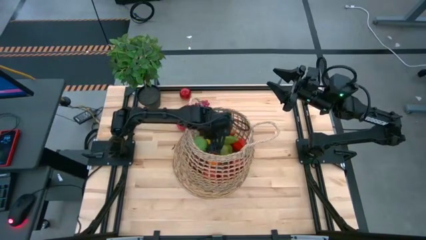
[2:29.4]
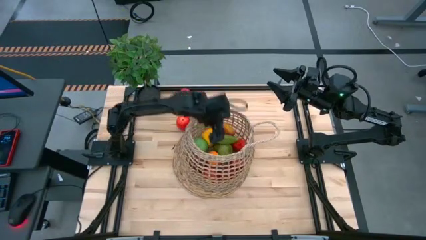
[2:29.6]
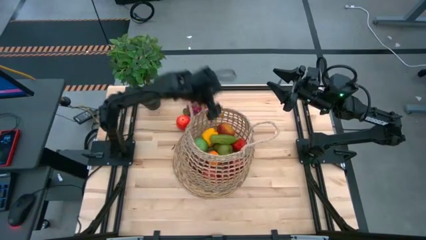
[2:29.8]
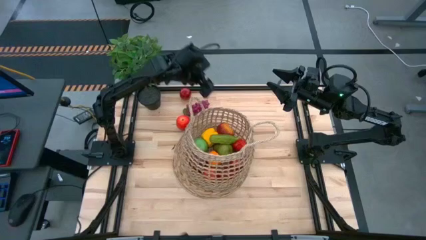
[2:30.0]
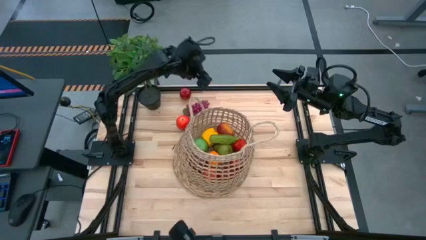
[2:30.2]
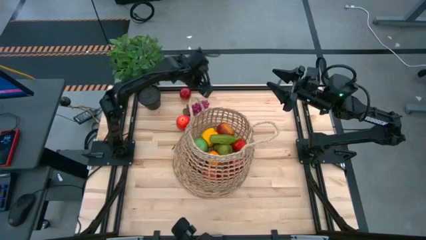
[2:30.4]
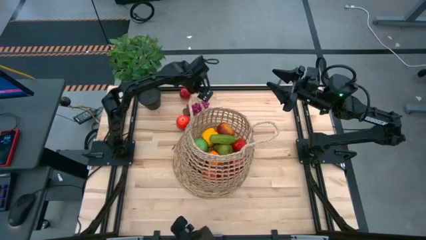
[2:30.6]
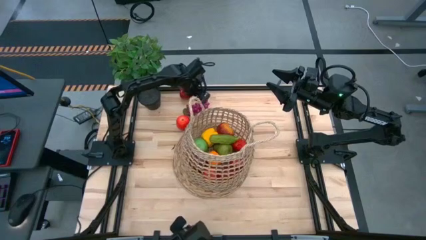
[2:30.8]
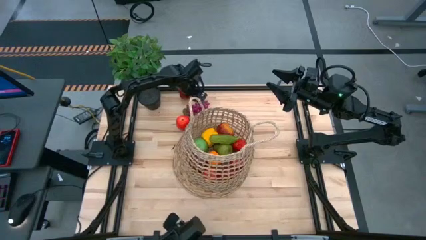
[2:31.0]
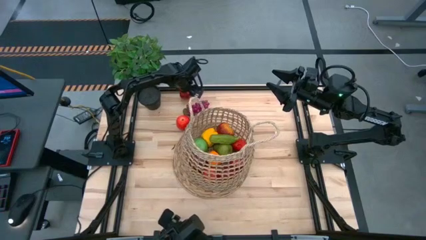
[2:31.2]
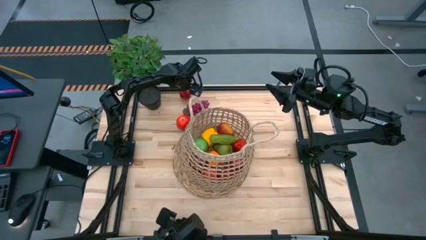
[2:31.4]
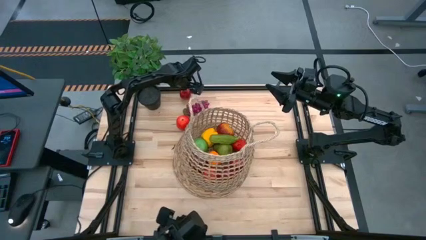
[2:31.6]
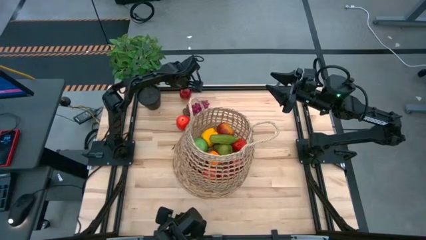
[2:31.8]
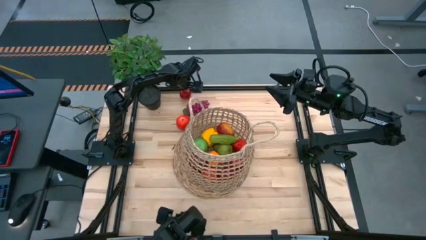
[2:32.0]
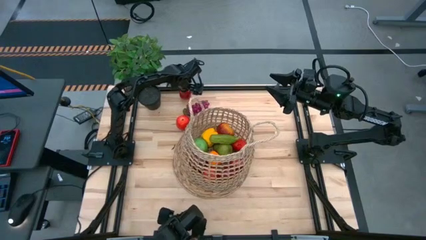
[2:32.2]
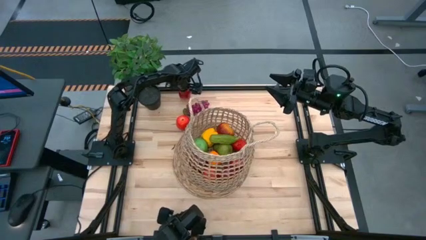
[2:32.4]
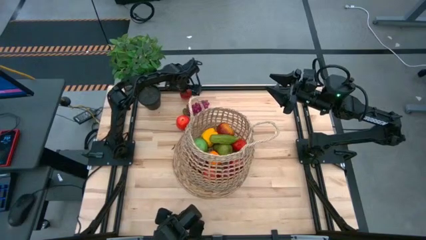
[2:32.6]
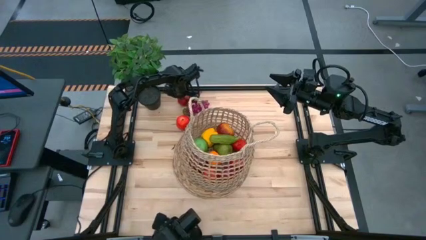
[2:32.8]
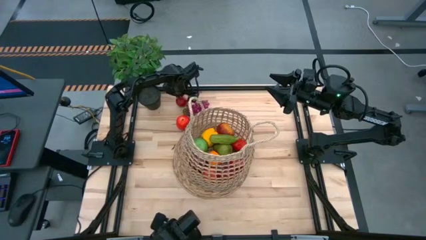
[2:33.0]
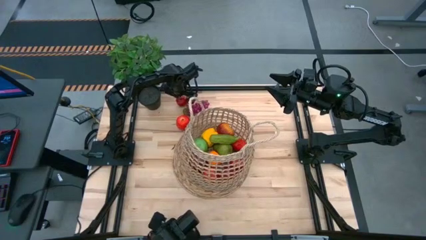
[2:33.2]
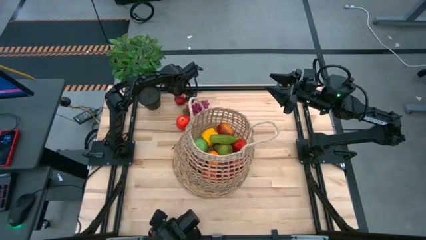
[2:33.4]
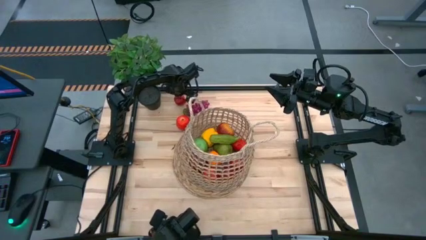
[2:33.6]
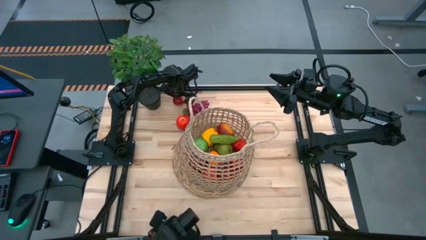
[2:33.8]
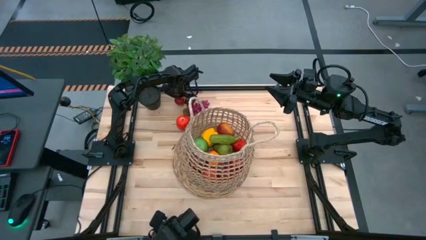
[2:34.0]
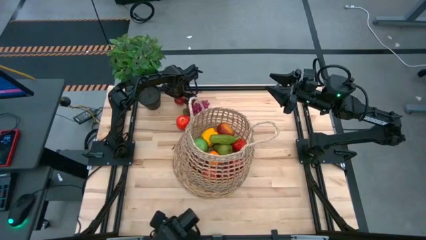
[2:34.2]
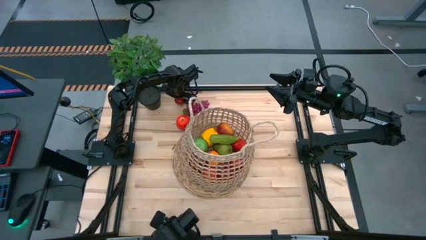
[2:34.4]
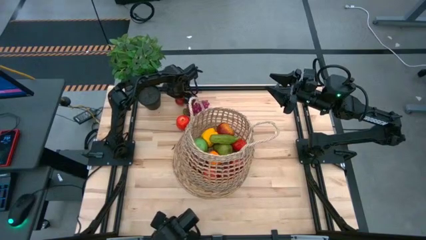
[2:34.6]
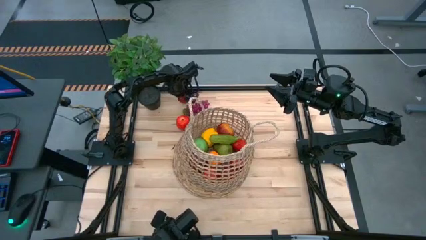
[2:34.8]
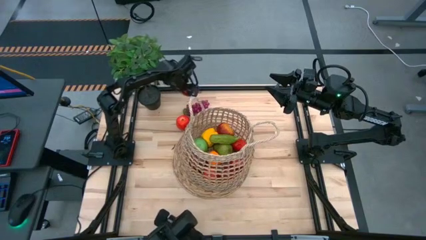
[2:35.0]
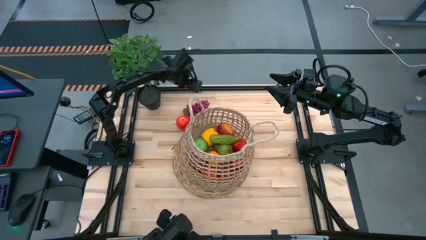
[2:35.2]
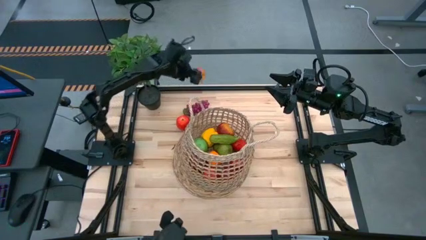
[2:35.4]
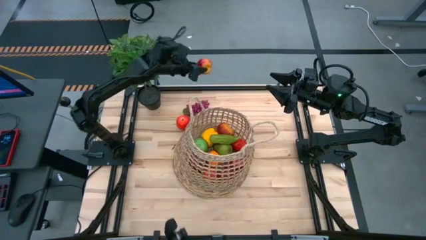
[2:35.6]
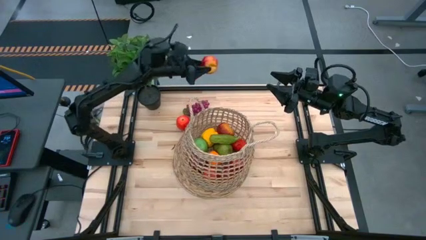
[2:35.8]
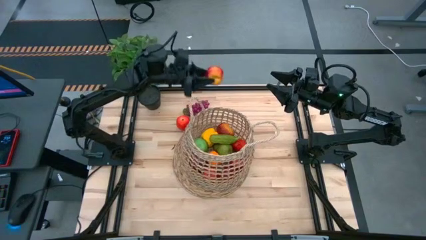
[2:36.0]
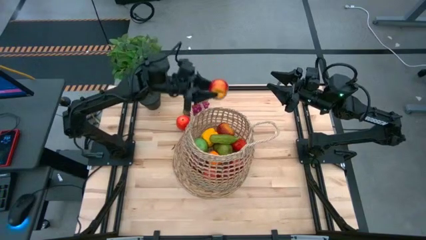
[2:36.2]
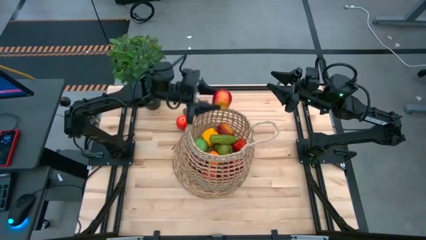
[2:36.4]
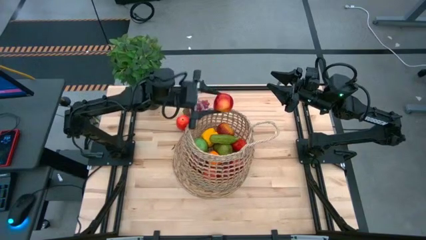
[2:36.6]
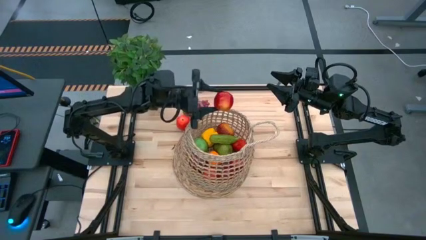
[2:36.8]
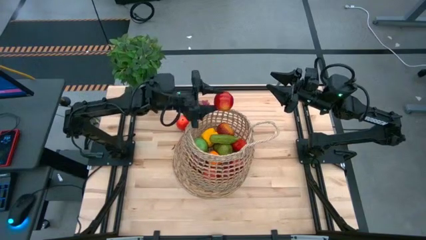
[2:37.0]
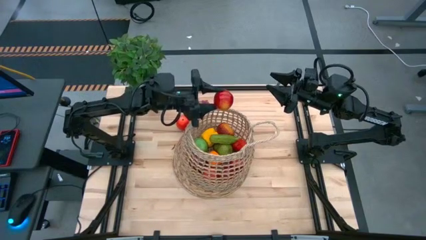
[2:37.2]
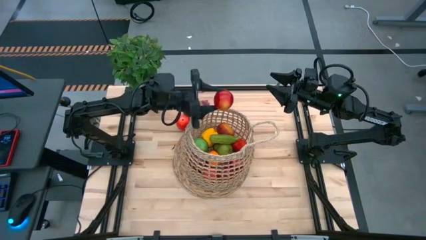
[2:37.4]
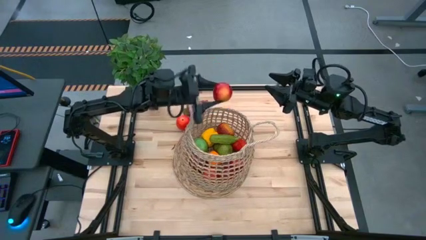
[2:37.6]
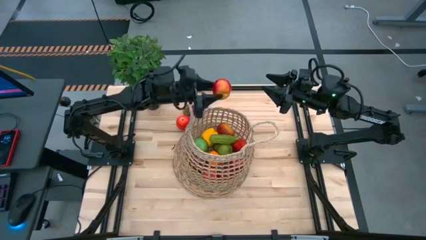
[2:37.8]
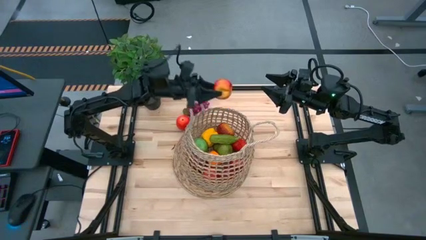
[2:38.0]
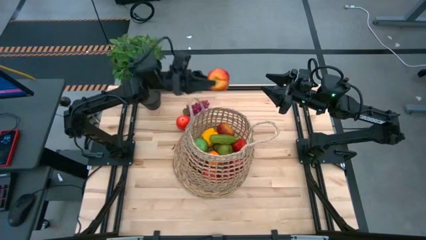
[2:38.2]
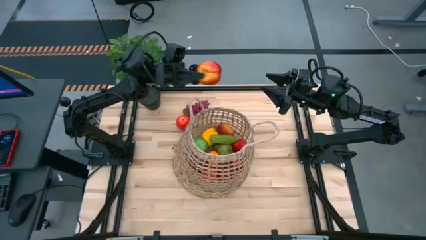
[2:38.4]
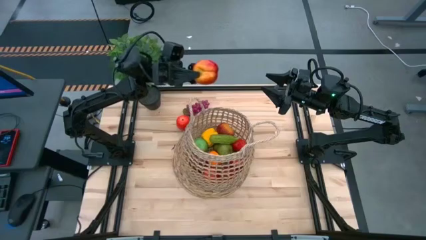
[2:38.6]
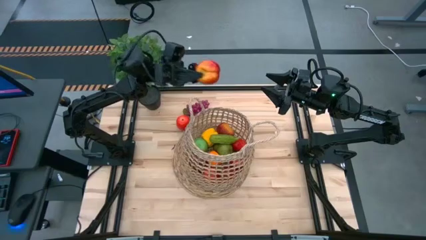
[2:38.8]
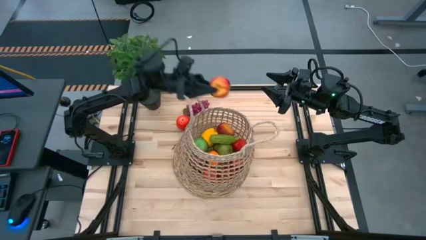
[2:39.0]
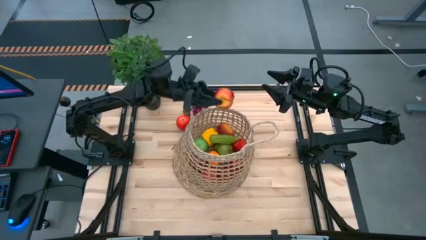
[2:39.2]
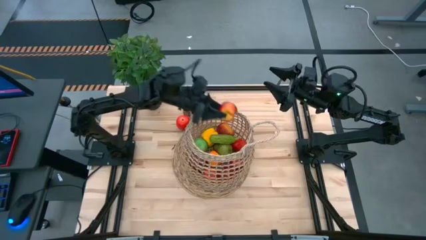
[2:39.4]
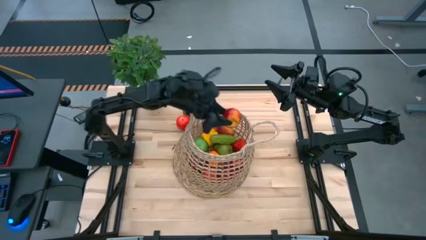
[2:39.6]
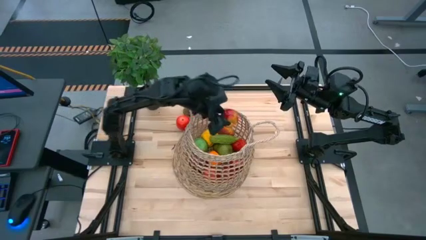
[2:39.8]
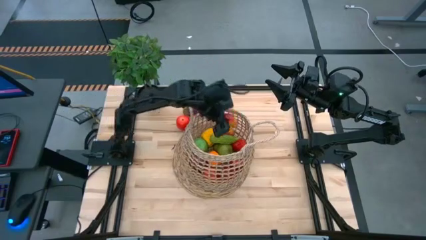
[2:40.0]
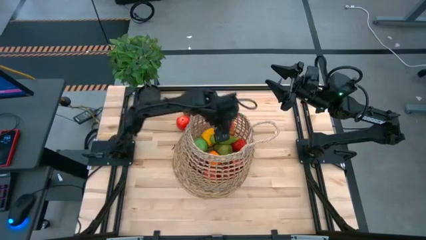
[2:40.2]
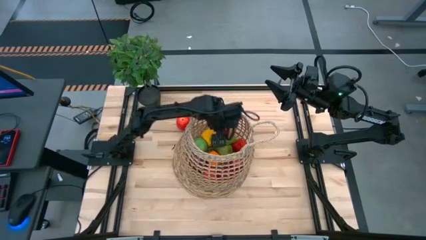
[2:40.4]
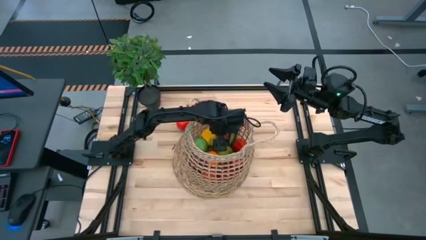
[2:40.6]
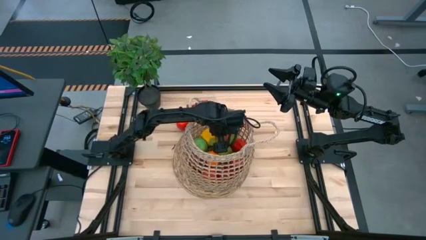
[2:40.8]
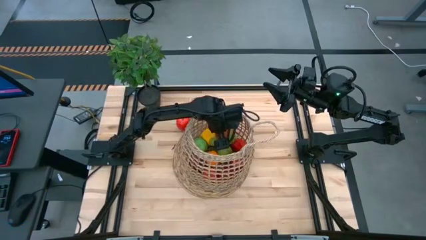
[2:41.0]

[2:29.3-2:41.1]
Task: Build produce basket
Put the red apple into the brown basket

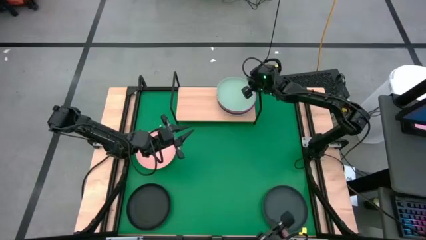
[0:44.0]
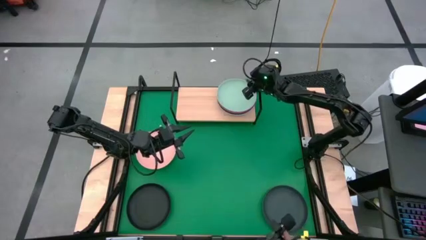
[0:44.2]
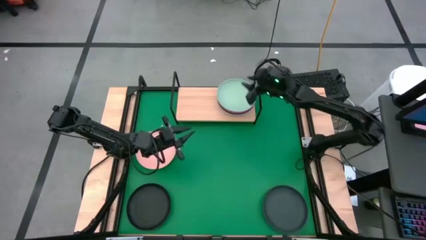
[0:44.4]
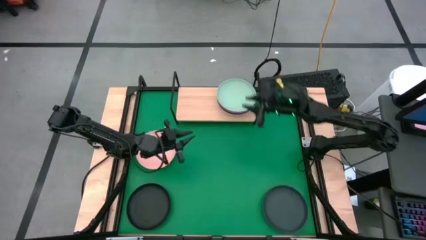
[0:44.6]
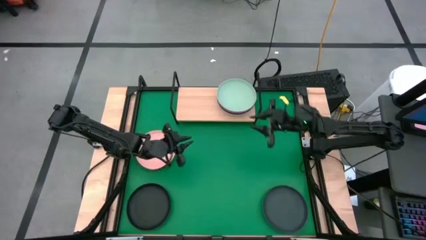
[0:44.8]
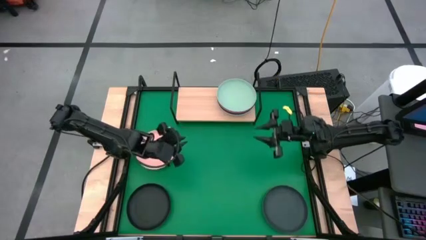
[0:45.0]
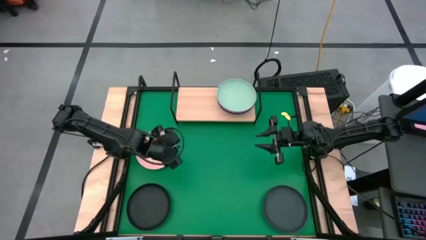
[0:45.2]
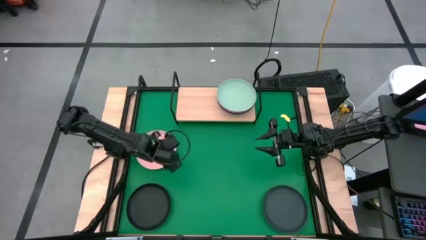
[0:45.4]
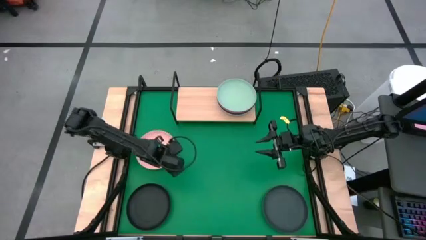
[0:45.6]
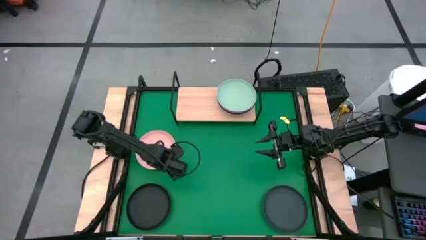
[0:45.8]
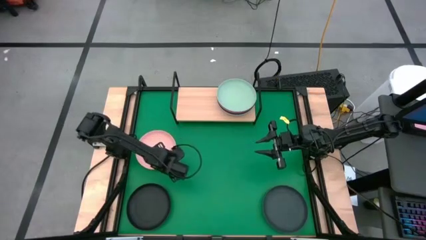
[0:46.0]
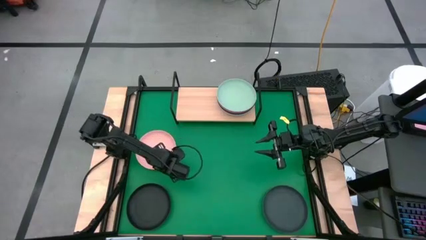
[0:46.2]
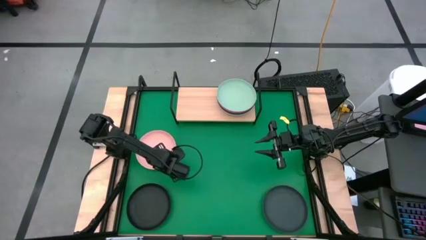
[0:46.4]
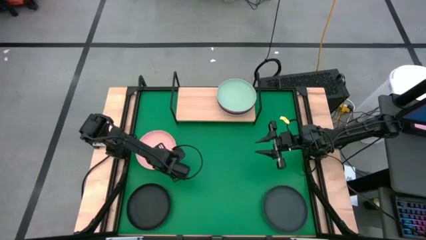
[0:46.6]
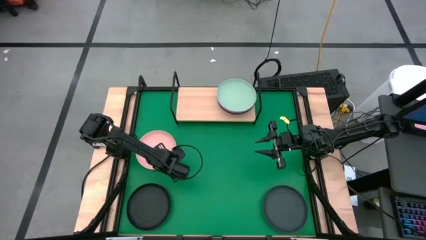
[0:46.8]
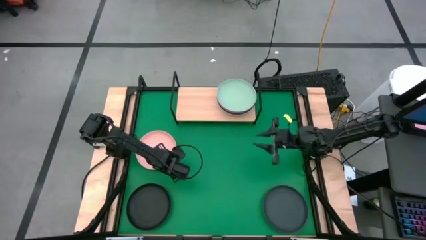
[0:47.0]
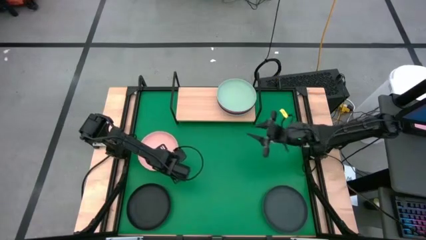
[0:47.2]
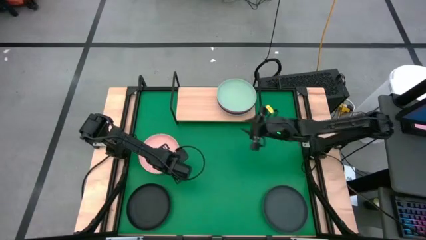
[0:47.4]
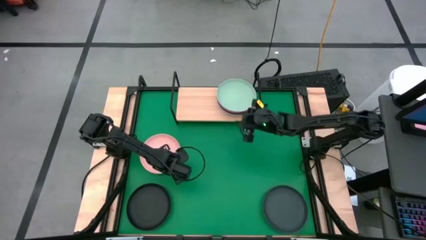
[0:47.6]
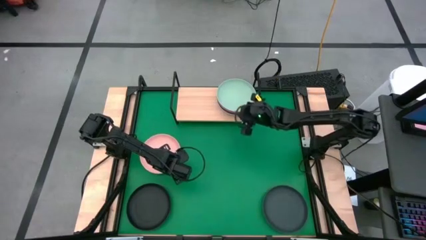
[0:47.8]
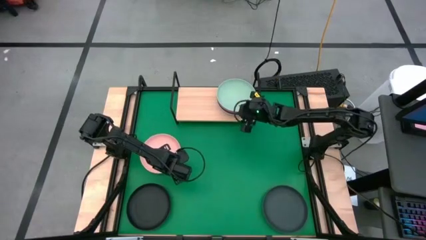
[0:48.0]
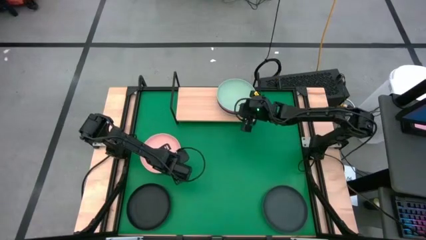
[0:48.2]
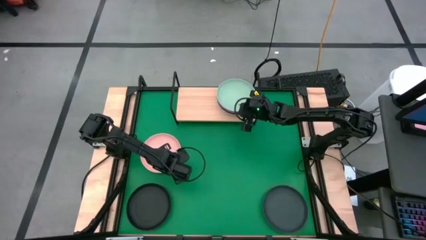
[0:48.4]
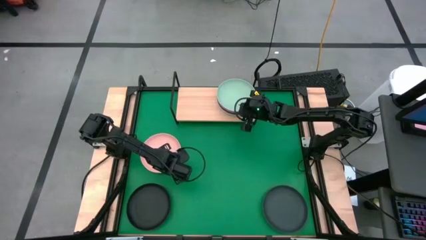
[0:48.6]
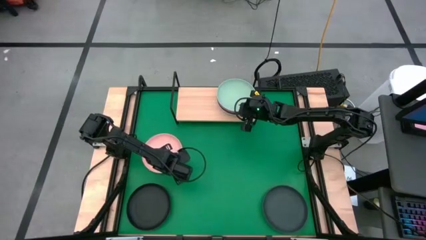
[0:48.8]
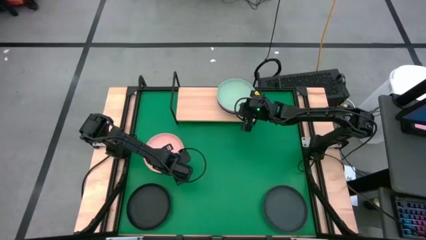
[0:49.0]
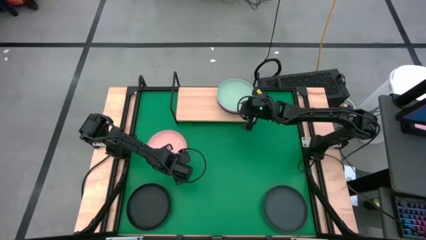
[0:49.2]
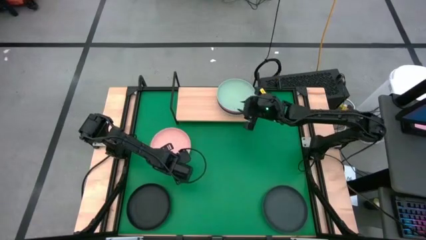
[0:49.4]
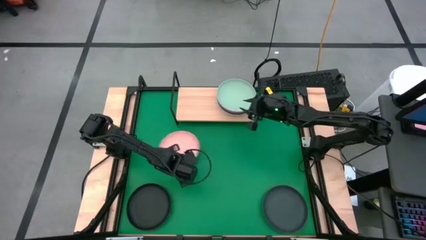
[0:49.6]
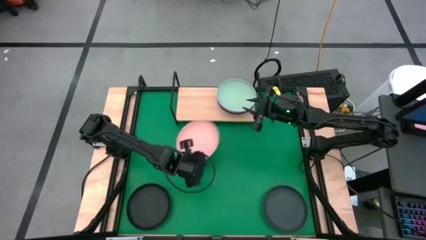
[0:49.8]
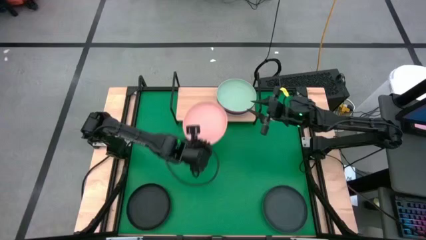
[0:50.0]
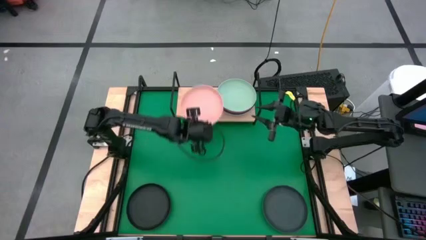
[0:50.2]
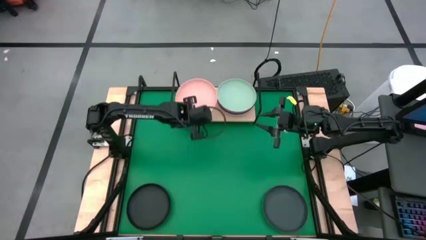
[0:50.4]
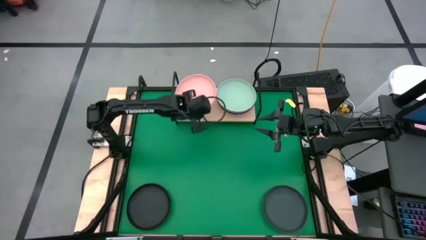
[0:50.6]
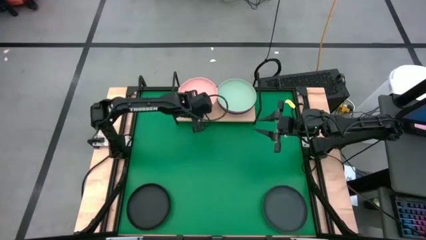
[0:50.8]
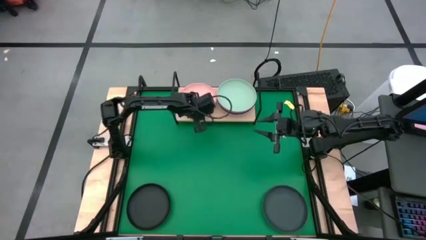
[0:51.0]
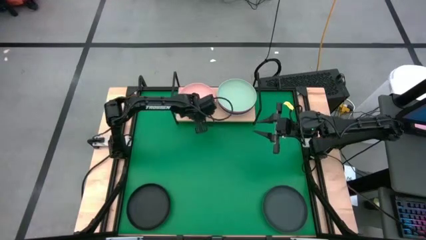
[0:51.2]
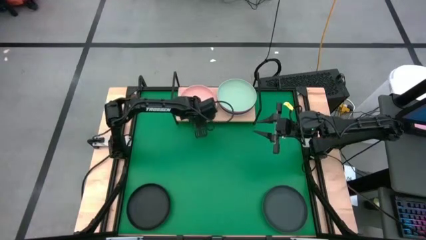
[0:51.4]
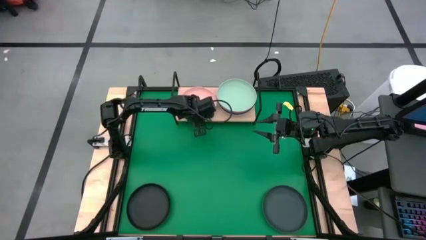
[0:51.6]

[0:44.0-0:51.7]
Task: Place and stack plates onto a shelf
Put the orange plate on the shelf
